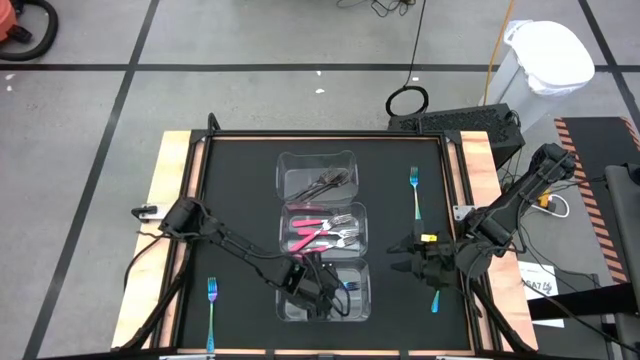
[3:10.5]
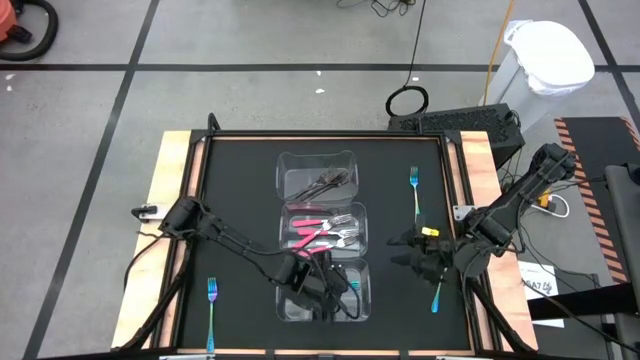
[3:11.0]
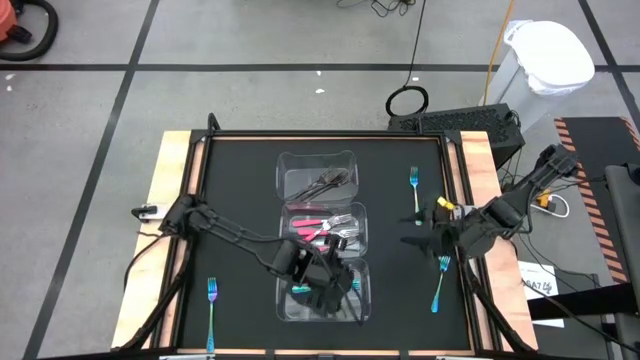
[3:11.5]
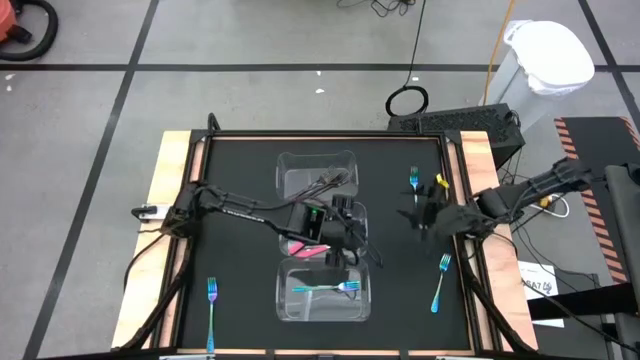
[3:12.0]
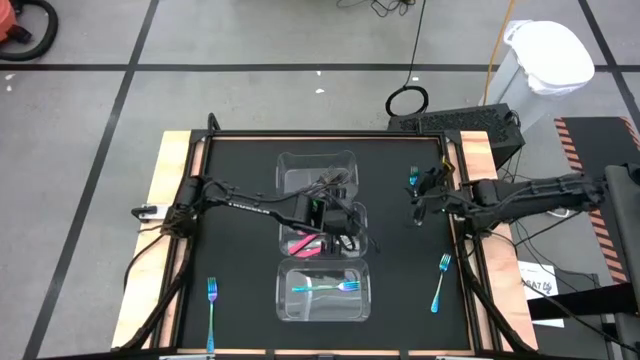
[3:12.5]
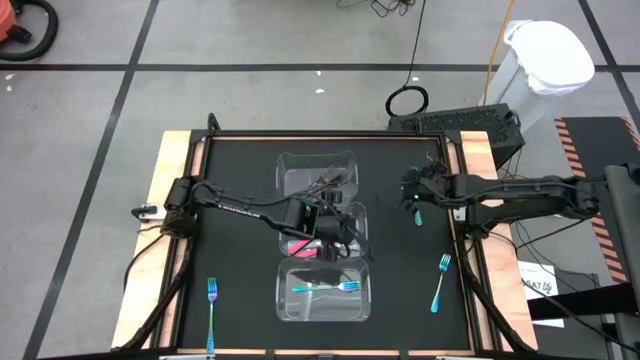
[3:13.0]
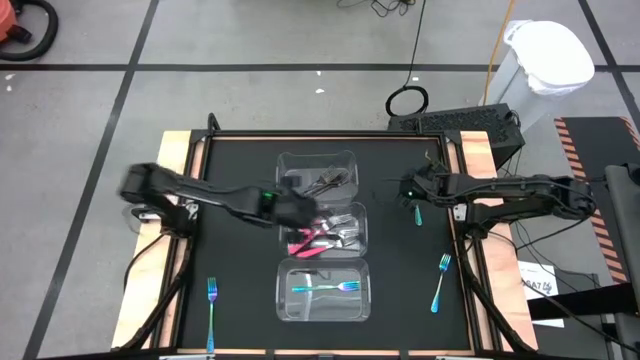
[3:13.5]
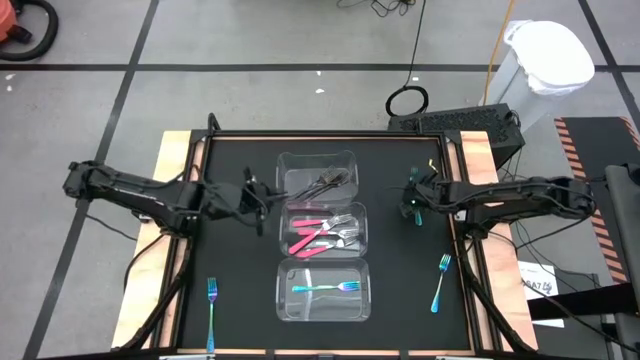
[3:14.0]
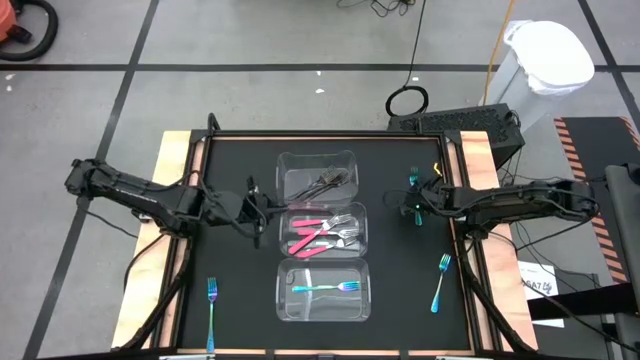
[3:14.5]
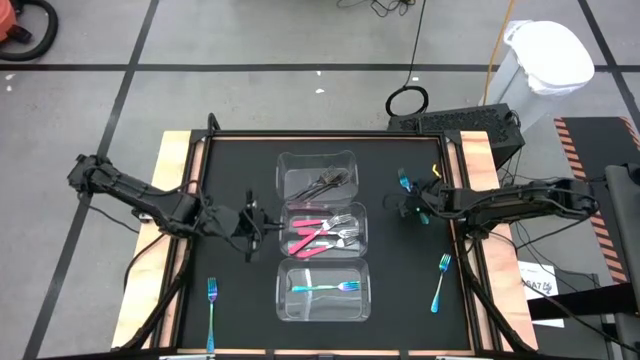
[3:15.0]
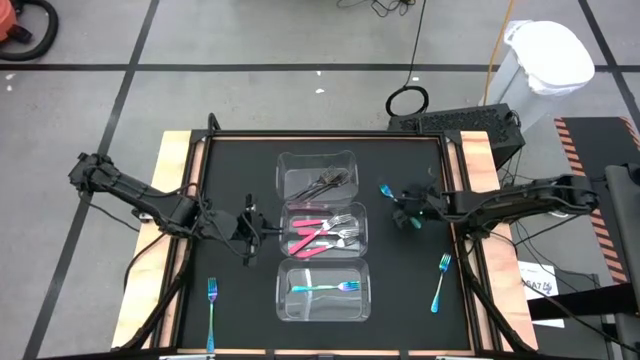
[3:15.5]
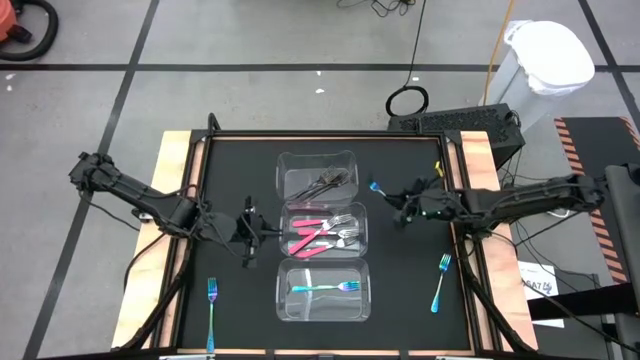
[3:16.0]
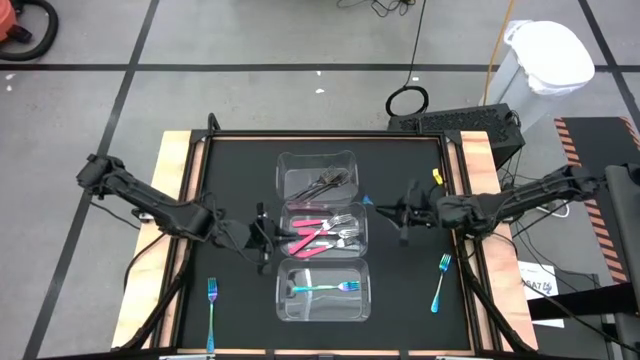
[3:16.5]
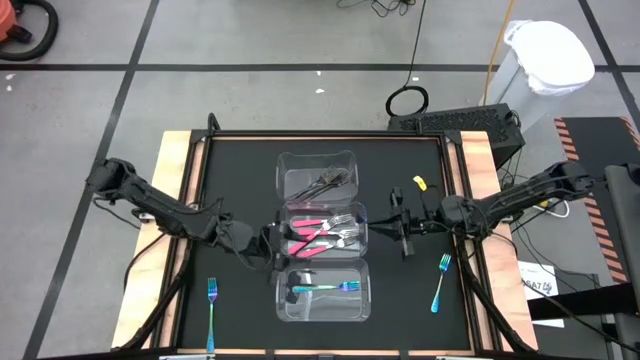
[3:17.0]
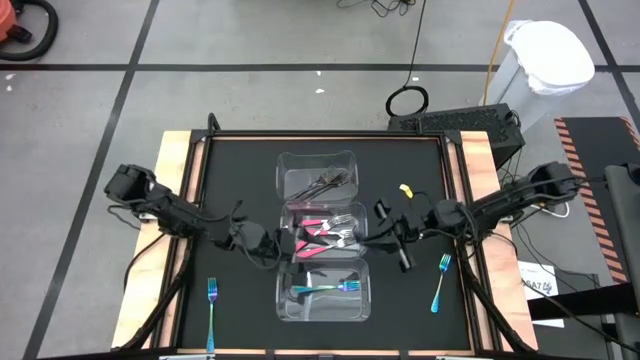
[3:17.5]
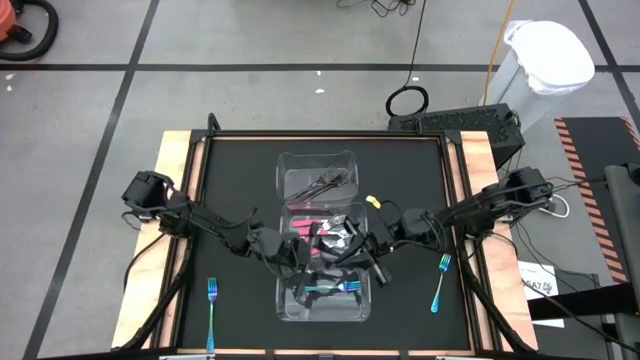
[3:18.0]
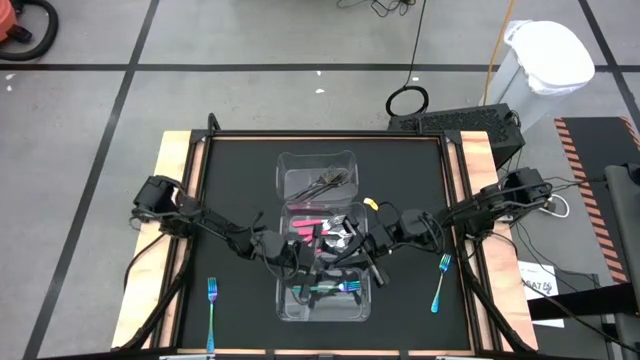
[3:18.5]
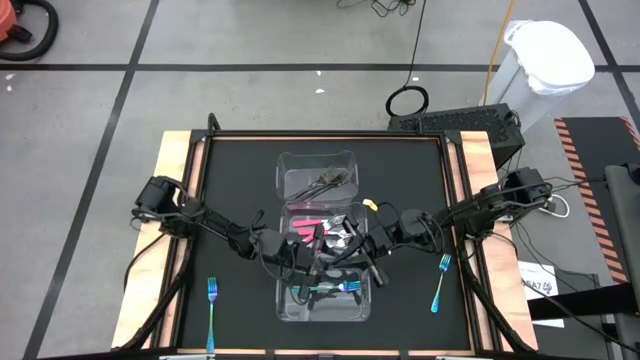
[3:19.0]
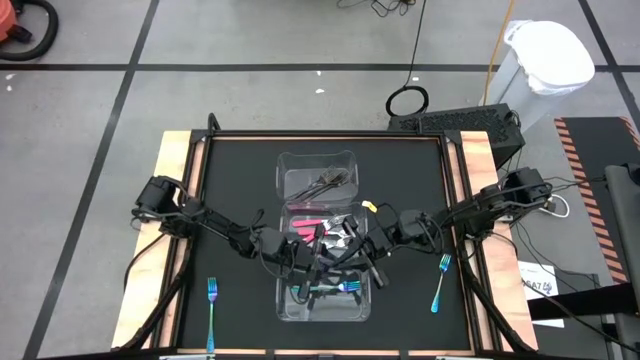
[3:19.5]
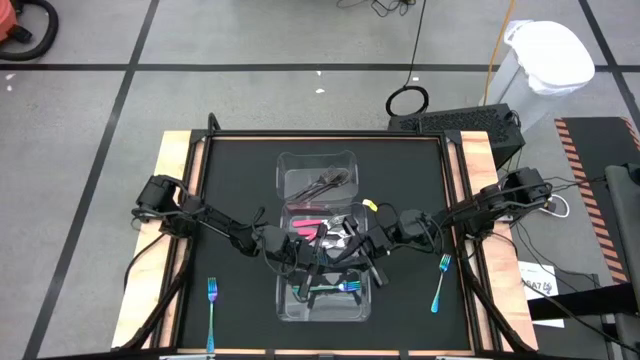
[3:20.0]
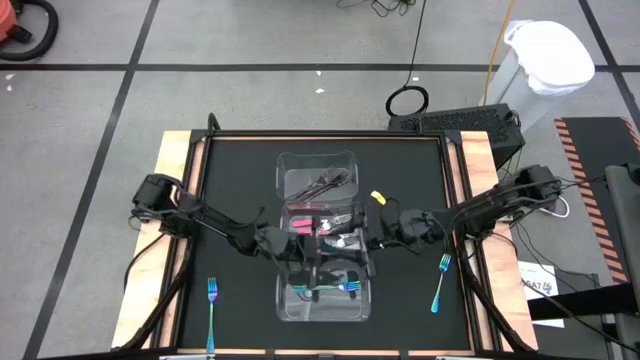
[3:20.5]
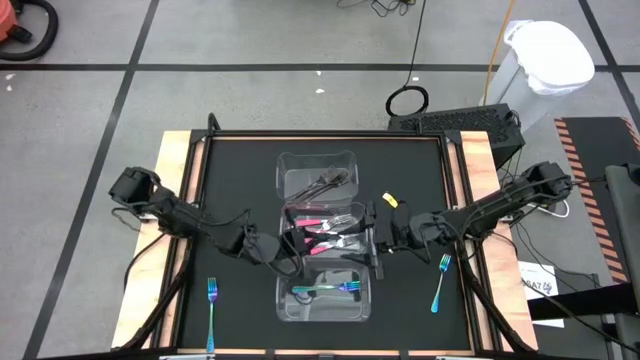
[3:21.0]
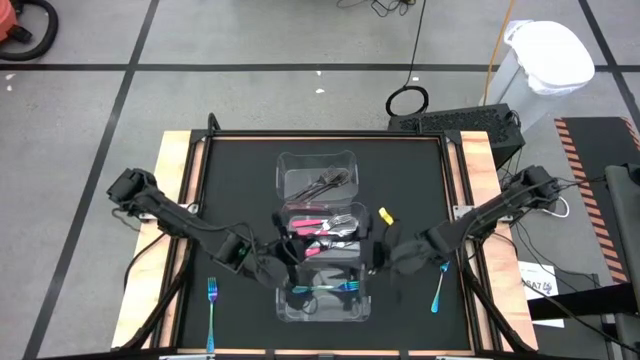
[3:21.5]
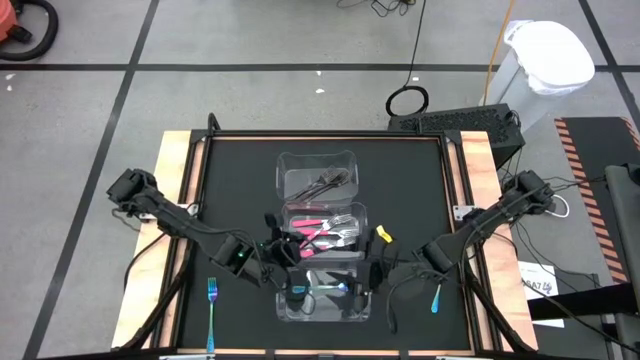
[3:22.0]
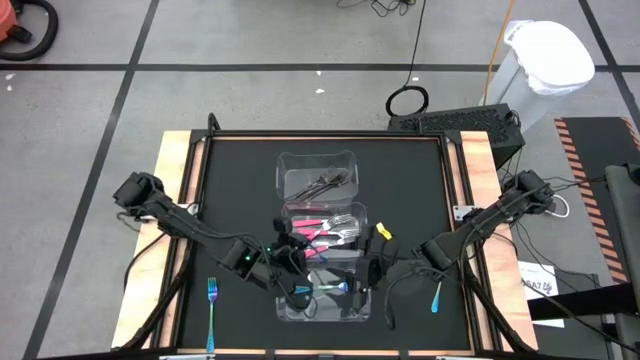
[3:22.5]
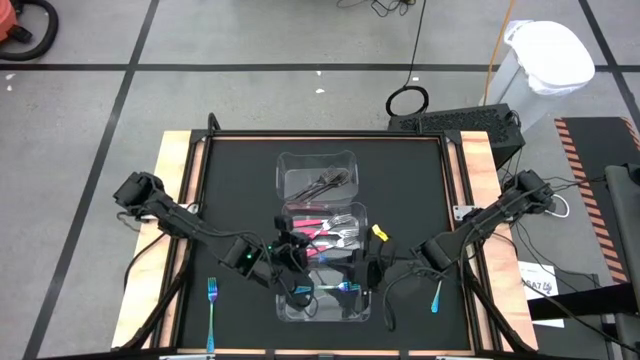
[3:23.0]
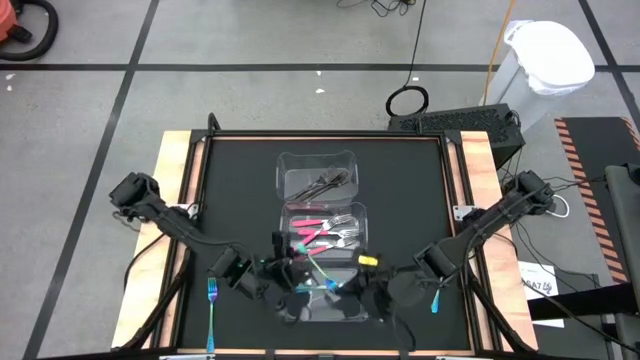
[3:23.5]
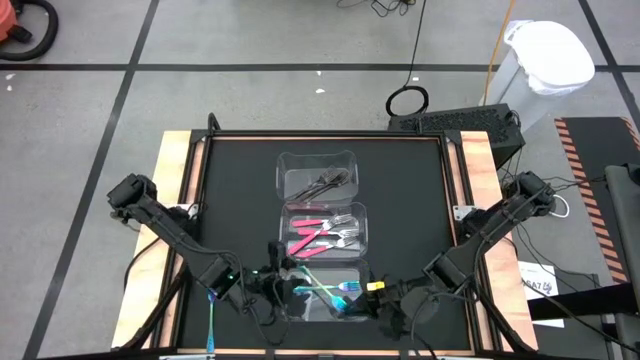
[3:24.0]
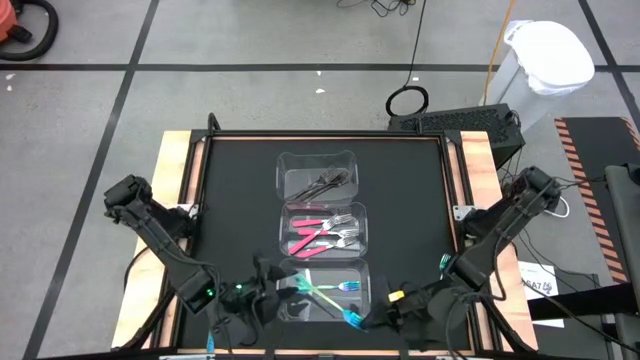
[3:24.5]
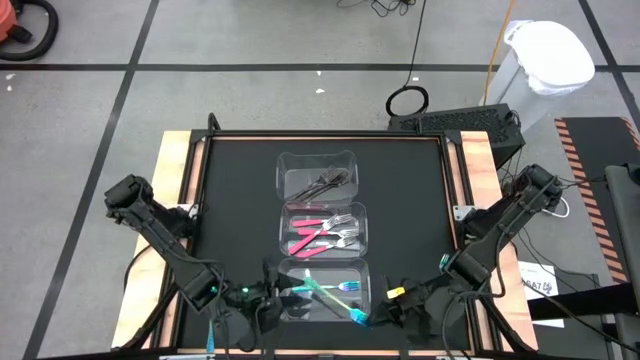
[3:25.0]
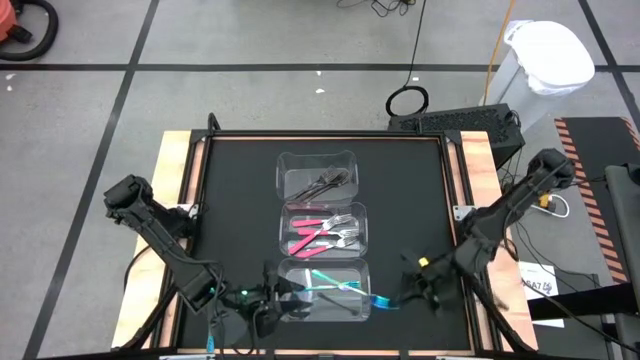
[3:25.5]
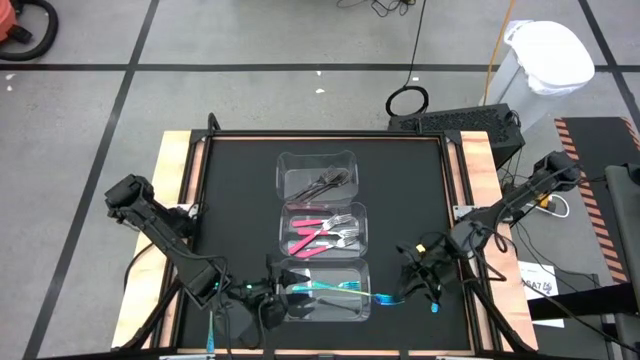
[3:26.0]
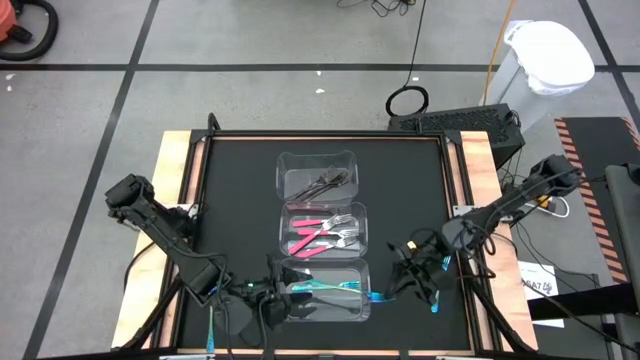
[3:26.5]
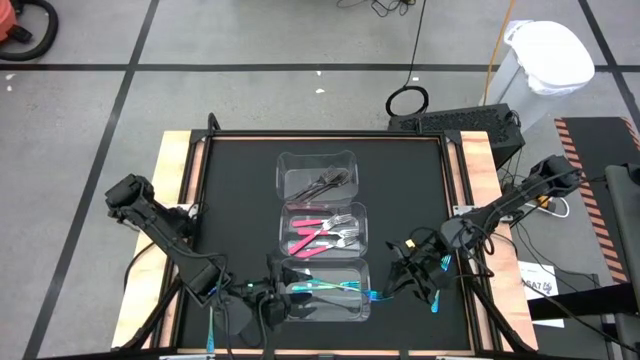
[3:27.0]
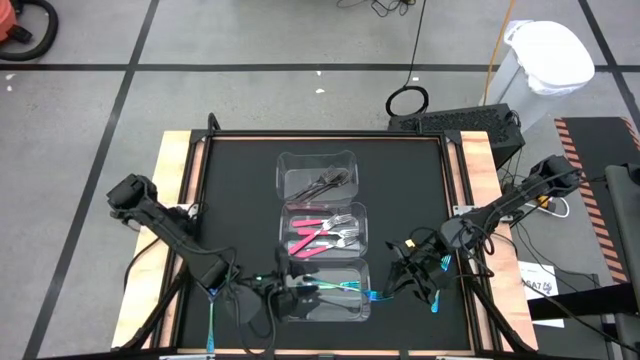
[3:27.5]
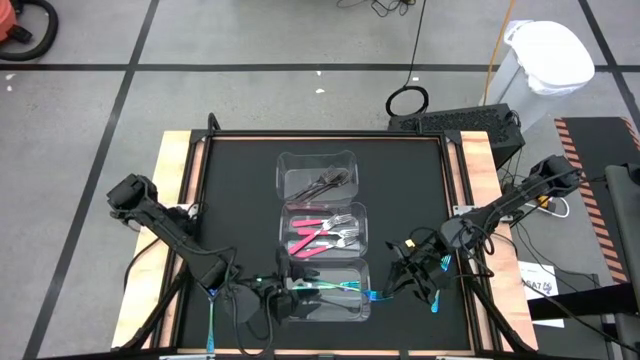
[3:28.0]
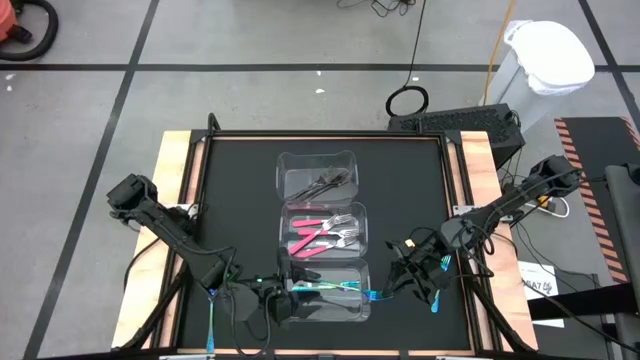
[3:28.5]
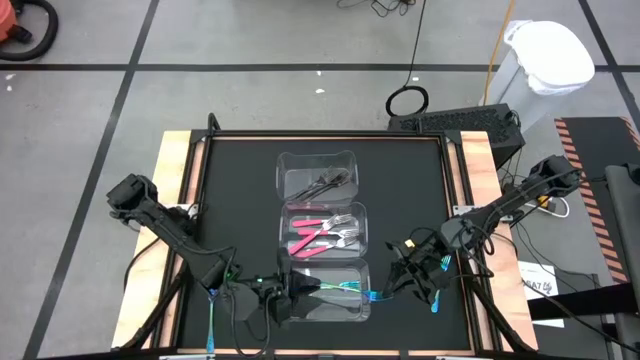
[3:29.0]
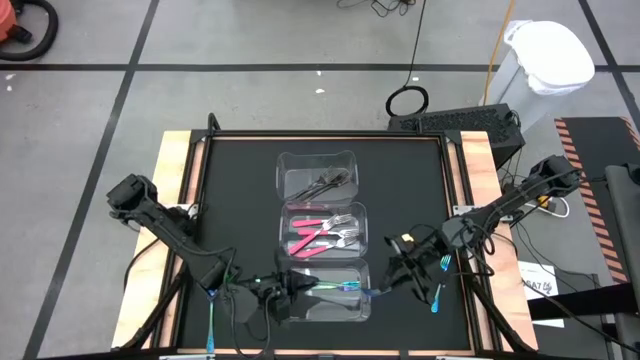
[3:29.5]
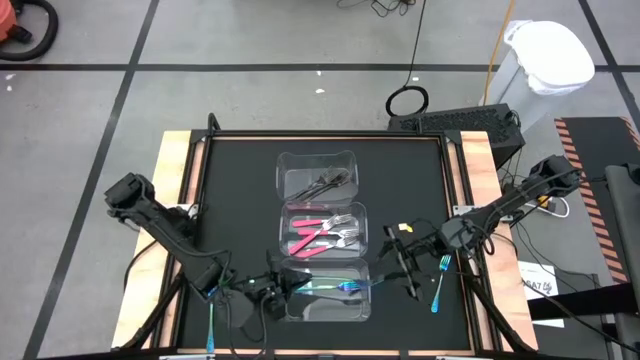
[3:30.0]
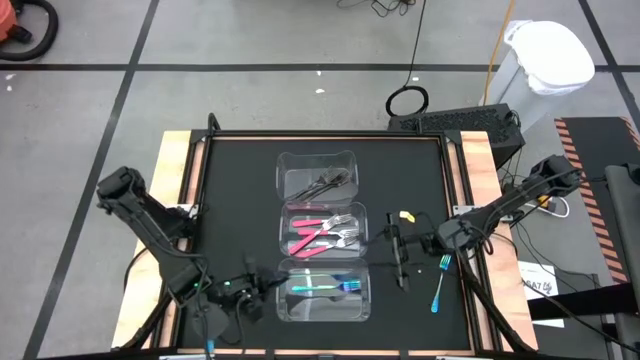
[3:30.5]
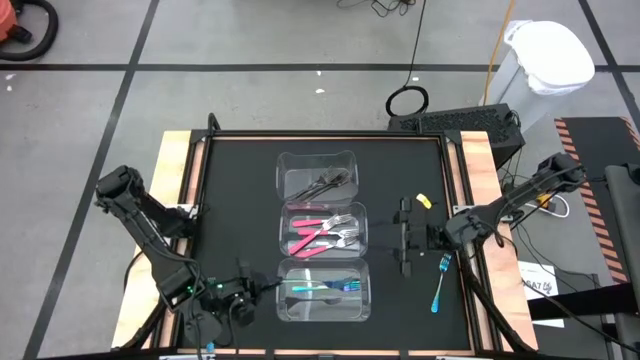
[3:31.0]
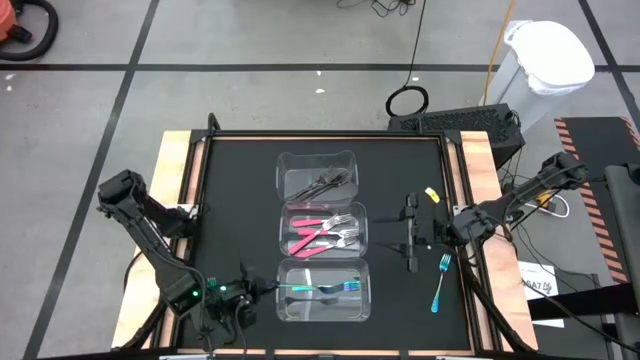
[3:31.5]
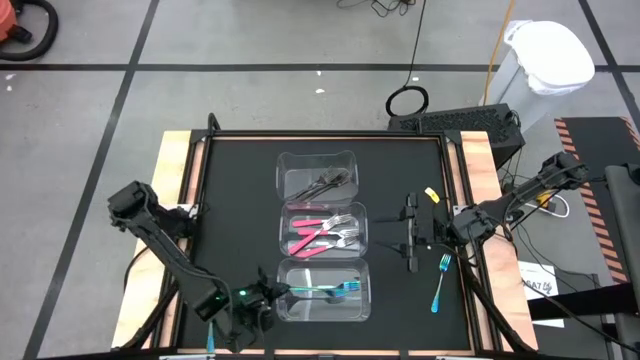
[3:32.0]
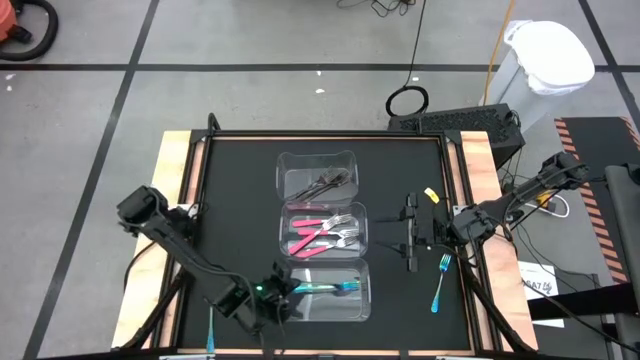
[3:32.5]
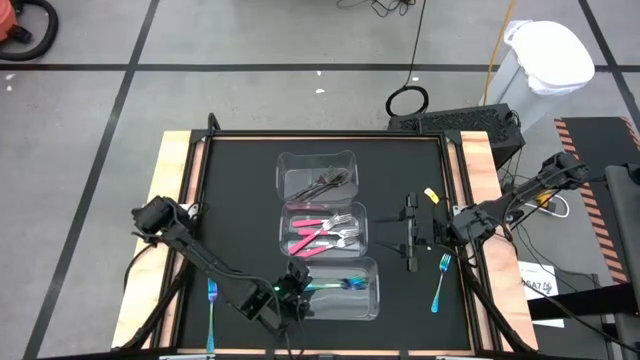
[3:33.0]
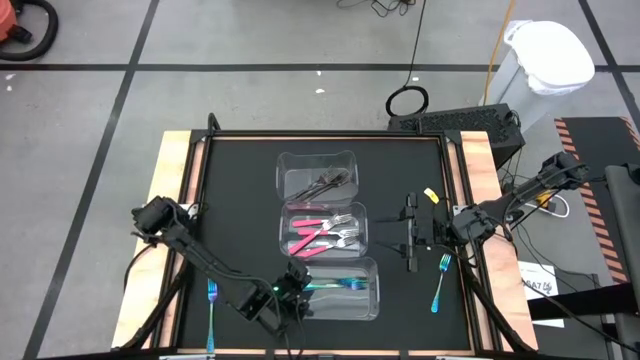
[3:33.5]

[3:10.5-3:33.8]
Task: Sort silverware by color (type)
Put the top blue fork into the bottom transparent bin
